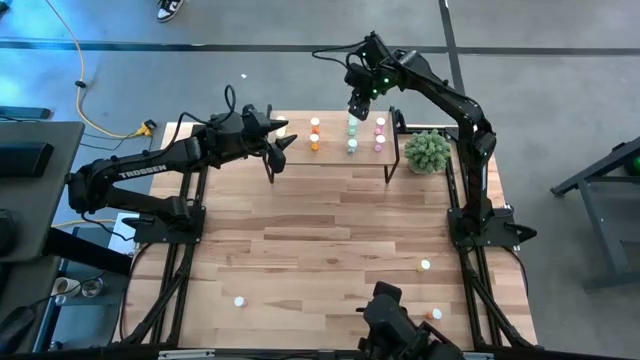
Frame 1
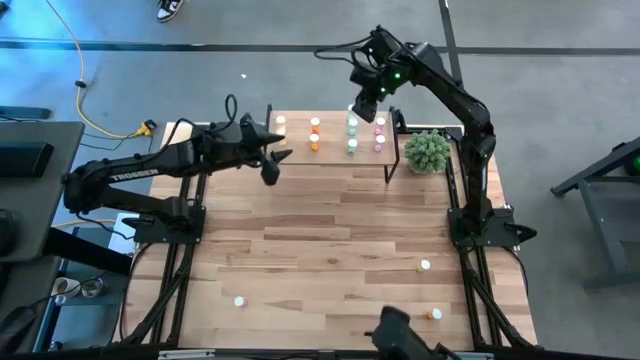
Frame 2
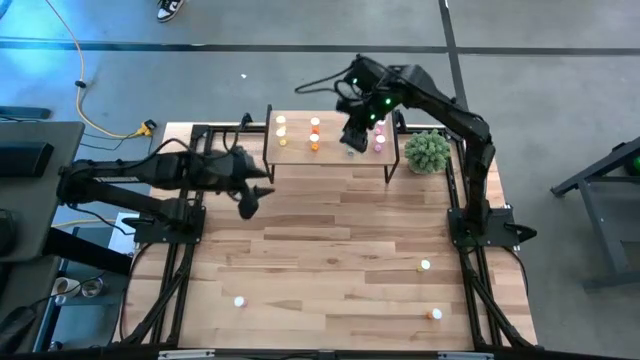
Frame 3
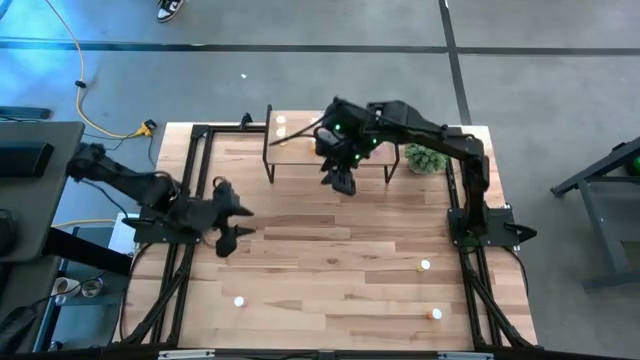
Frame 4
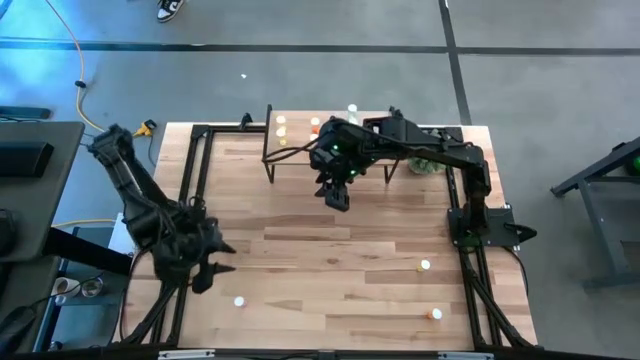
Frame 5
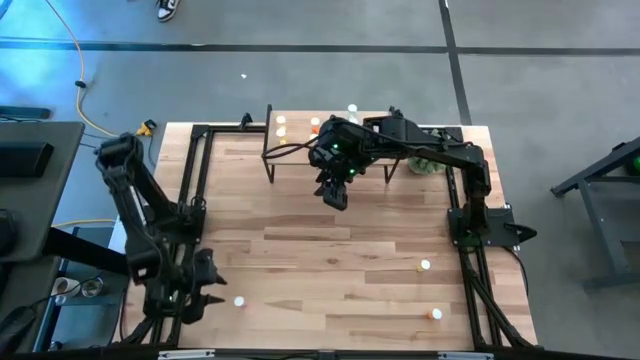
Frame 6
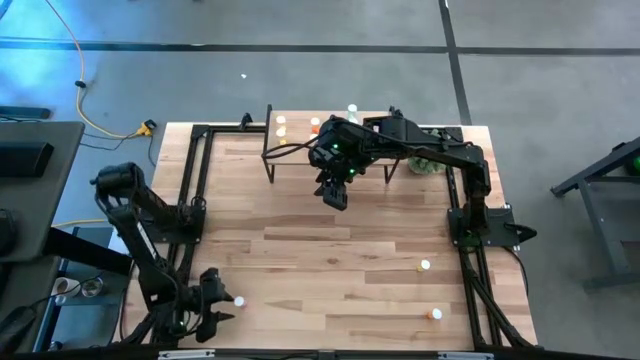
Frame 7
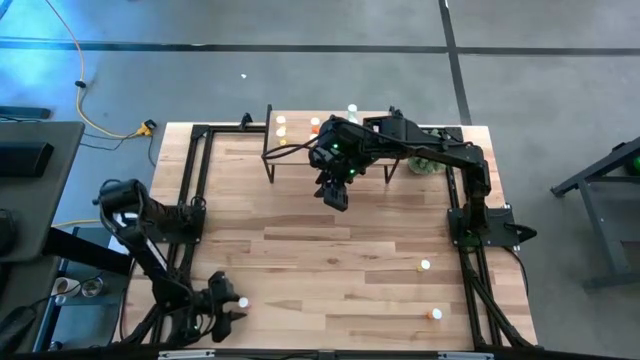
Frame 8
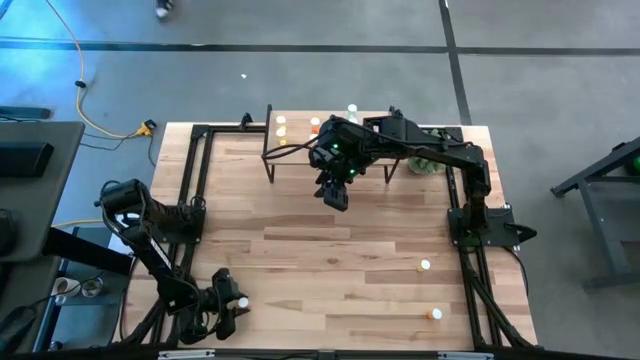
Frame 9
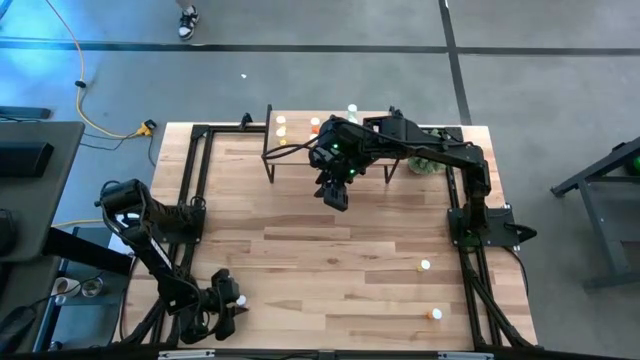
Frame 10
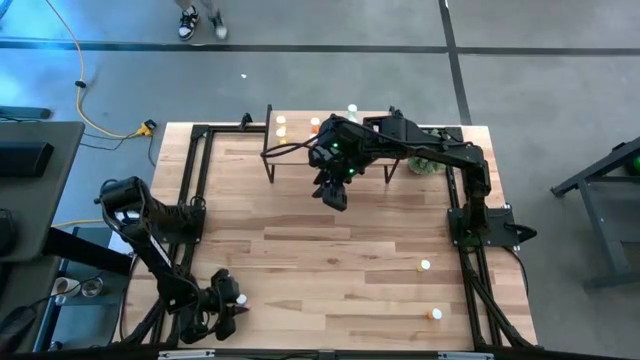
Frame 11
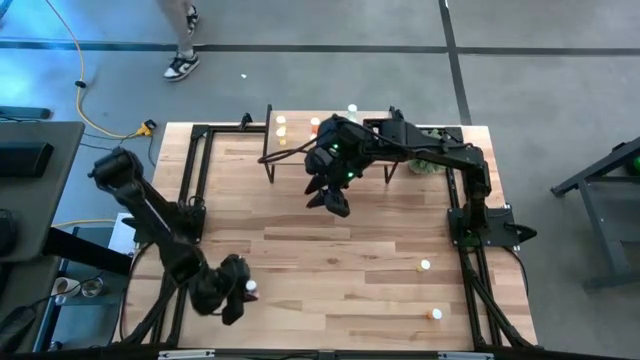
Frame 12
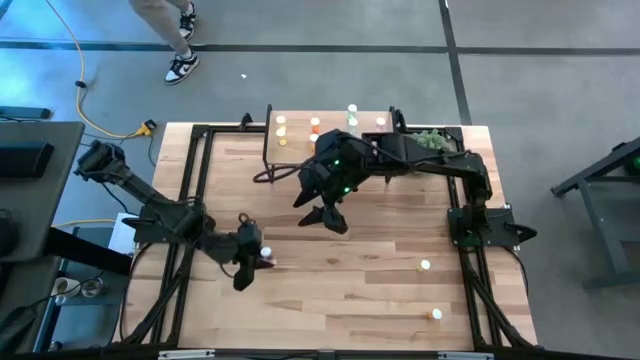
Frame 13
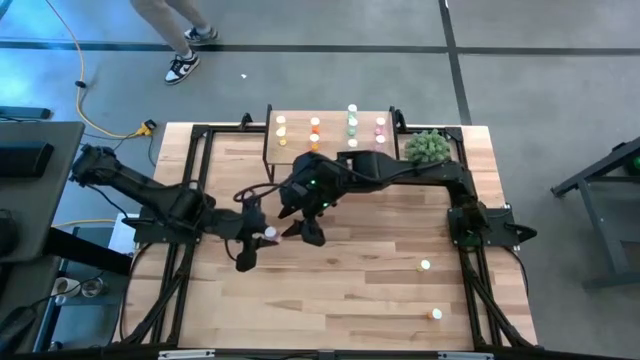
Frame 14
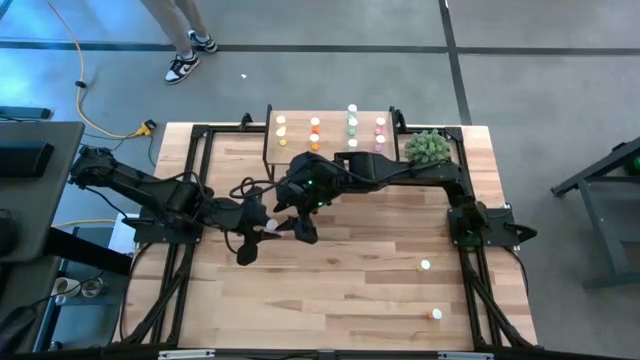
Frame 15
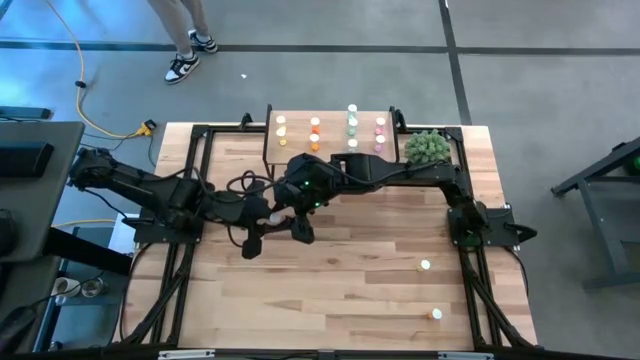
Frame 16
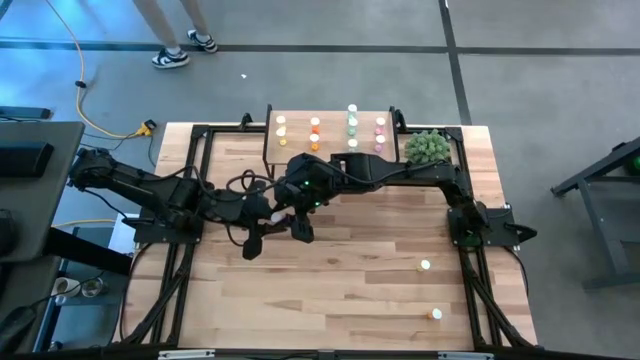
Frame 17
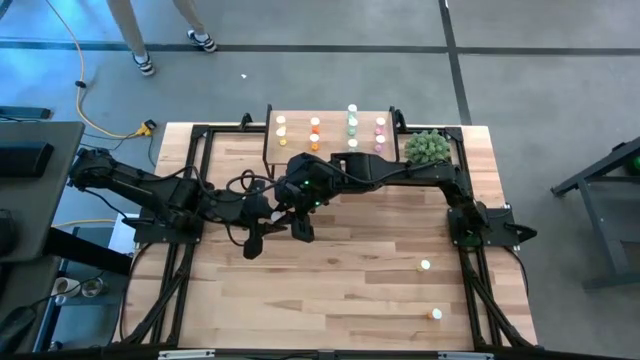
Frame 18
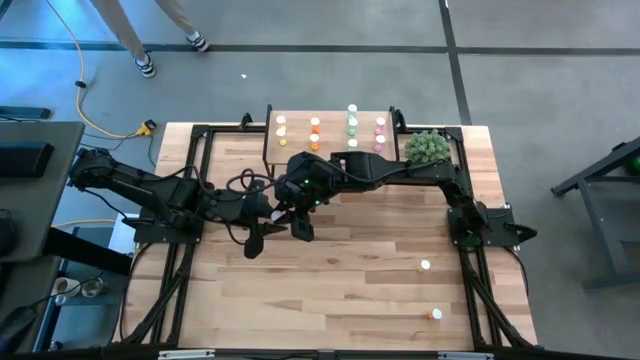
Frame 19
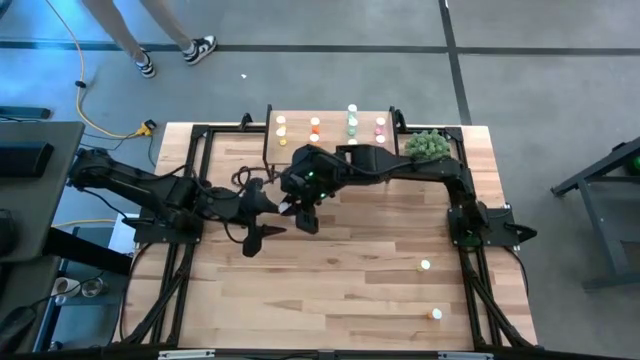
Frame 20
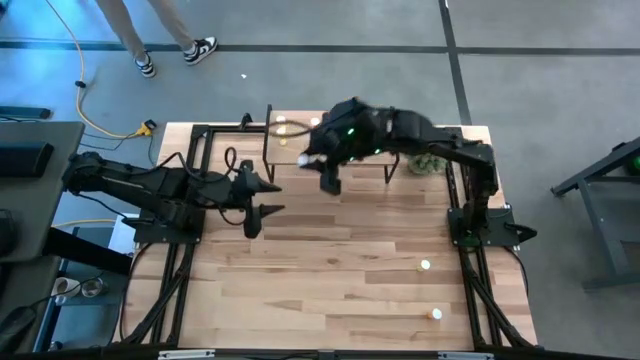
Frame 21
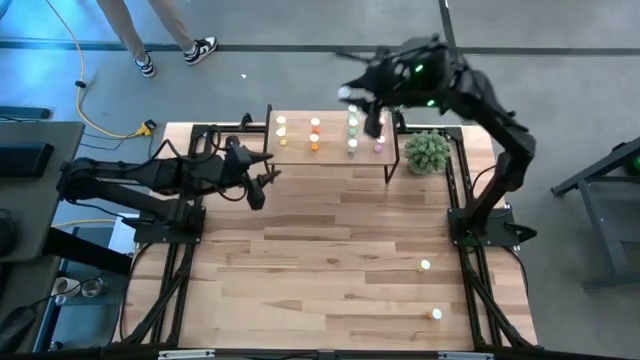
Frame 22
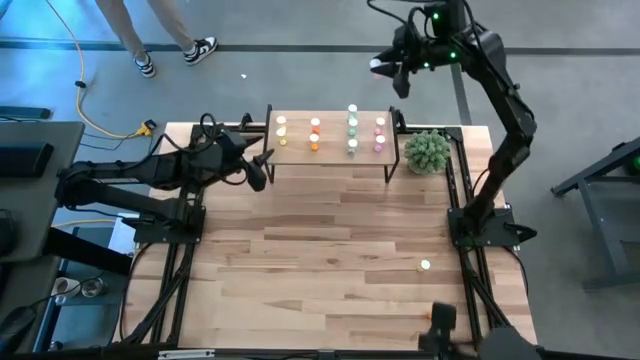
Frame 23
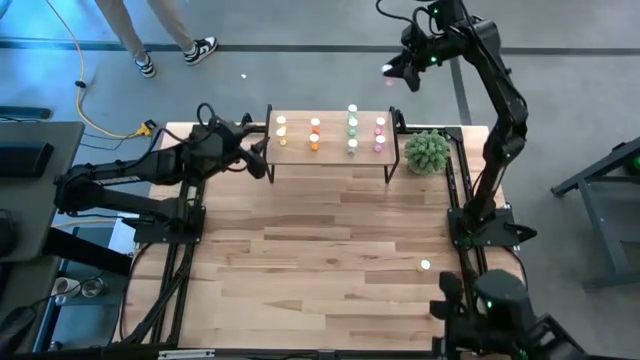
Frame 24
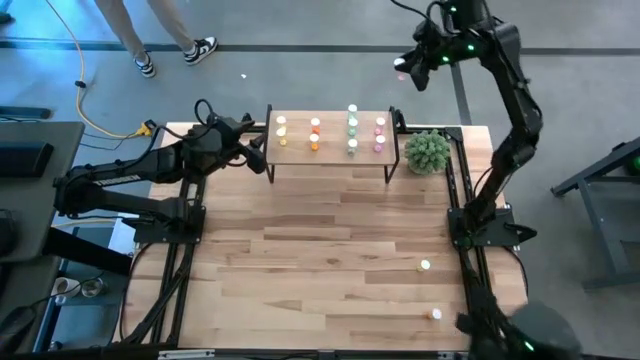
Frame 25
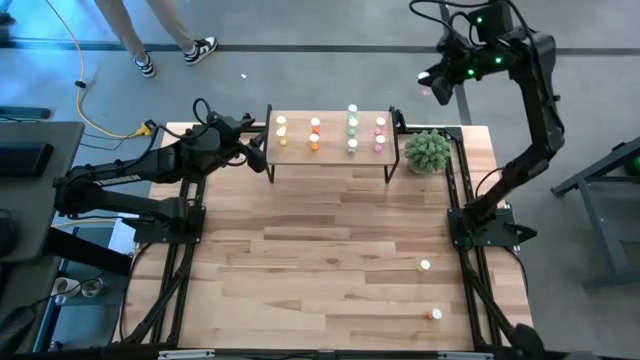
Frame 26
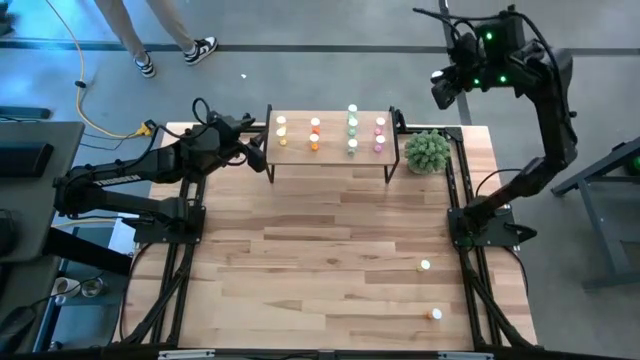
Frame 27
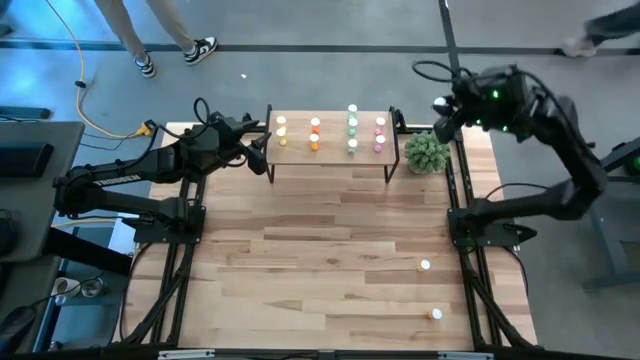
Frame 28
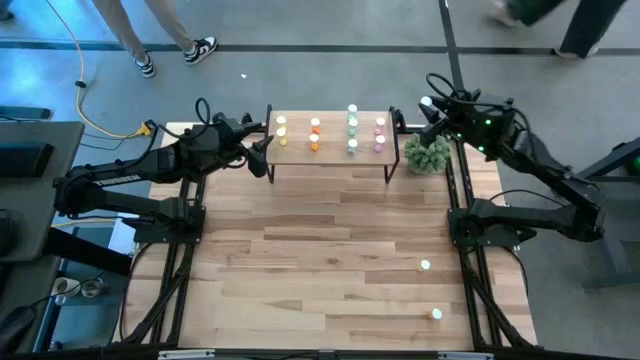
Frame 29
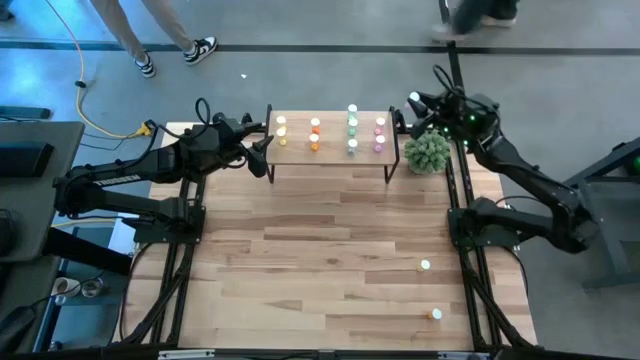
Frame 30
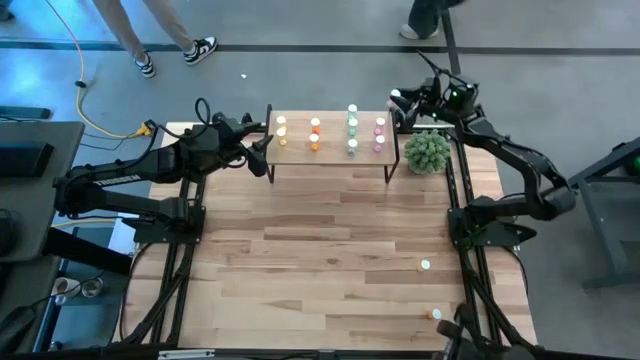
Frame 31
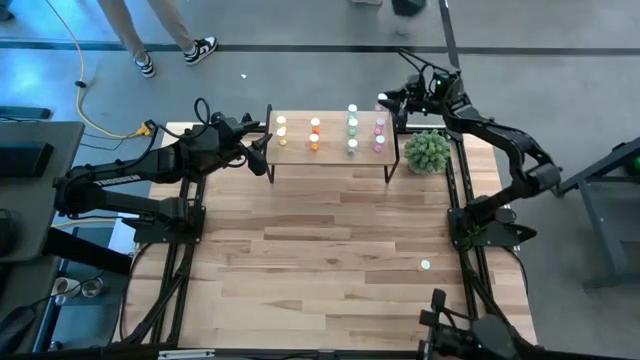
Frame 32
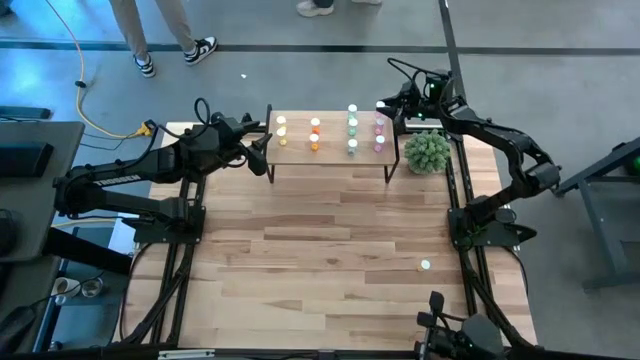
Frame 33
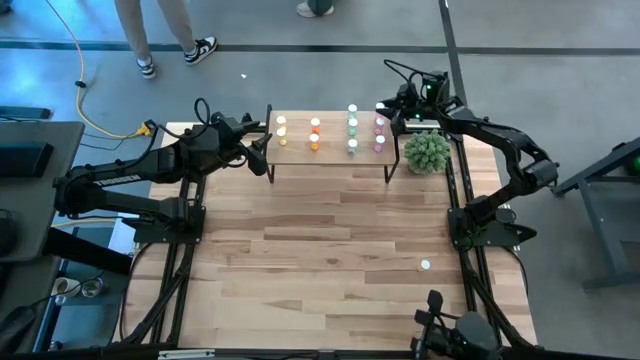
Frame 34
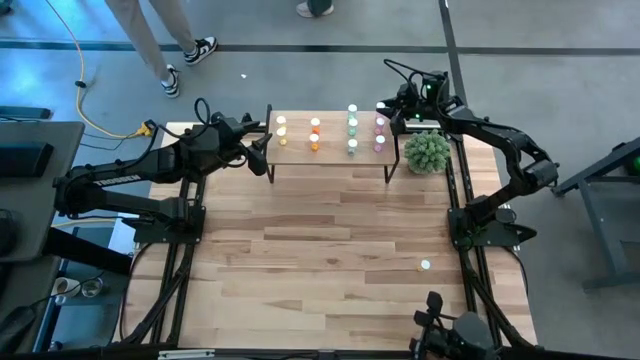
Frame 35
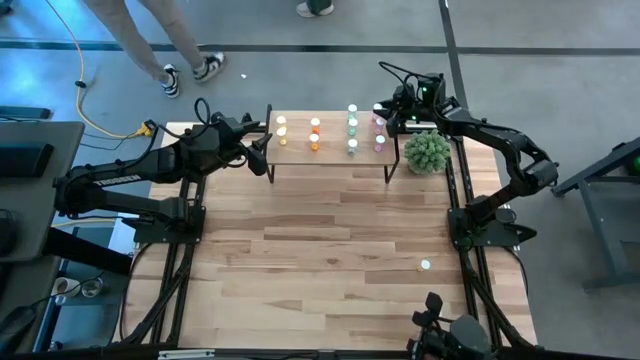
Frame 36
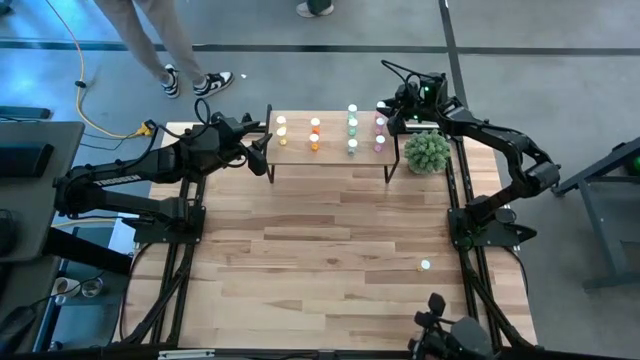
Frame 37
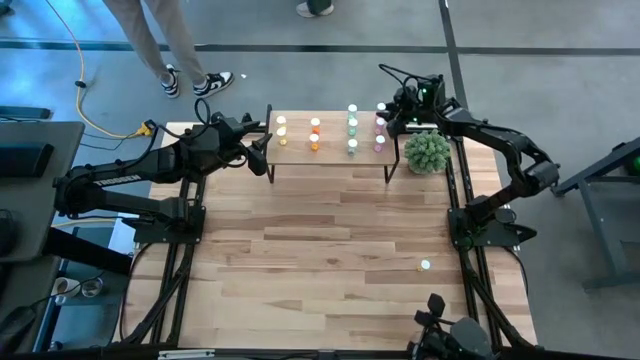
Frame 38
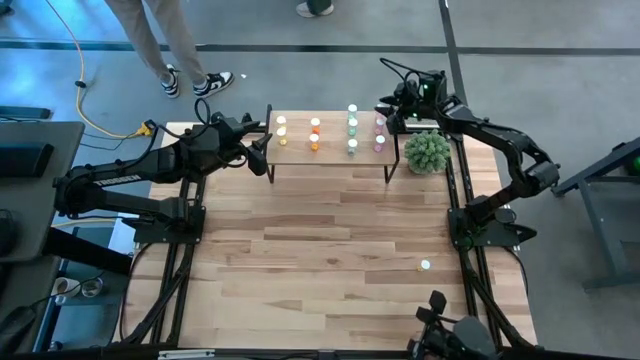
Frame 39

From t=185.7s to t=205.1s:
Task: Pick and place medicine bottles onto shelf by color
Put the pink pill bottle on the shelf aligned with the other pink pill bottles

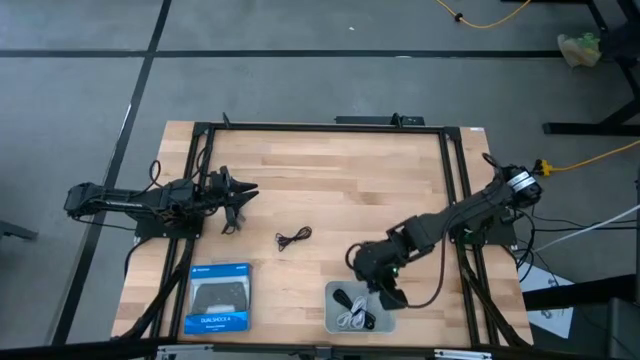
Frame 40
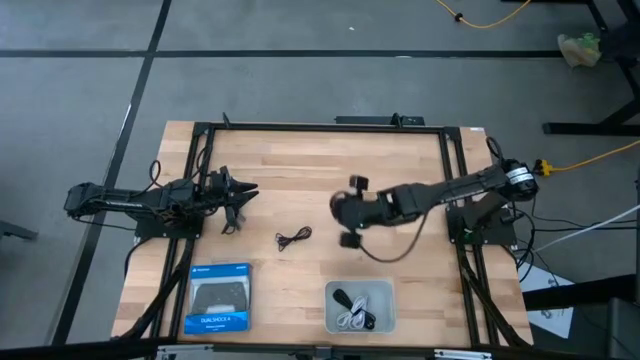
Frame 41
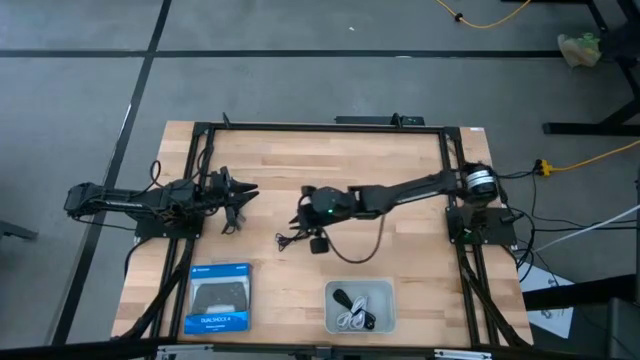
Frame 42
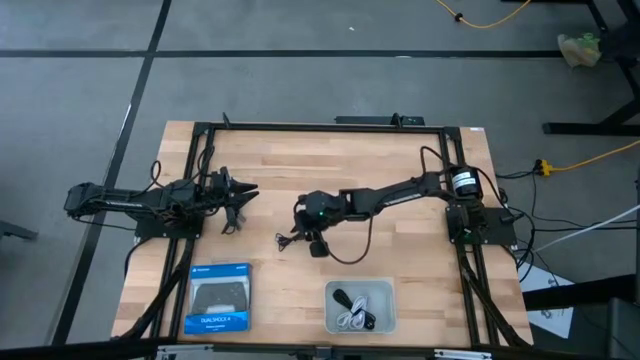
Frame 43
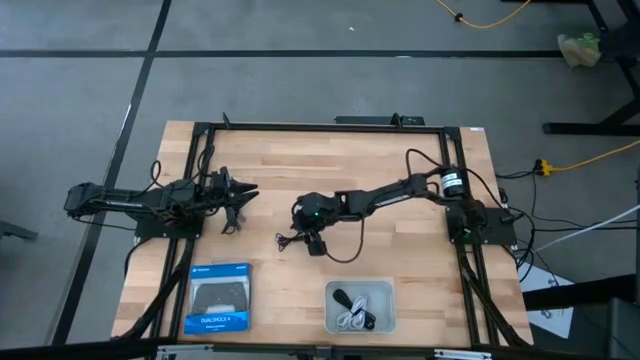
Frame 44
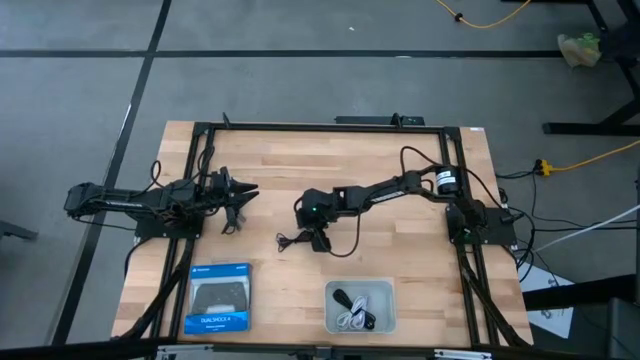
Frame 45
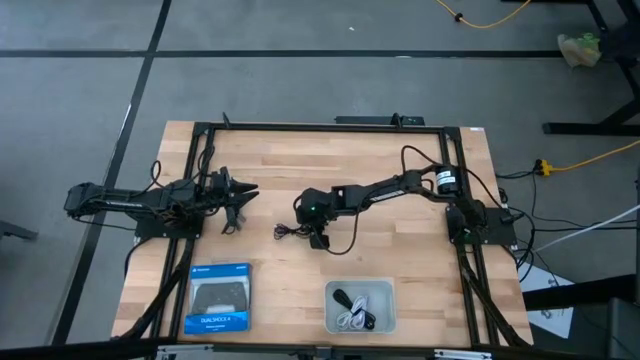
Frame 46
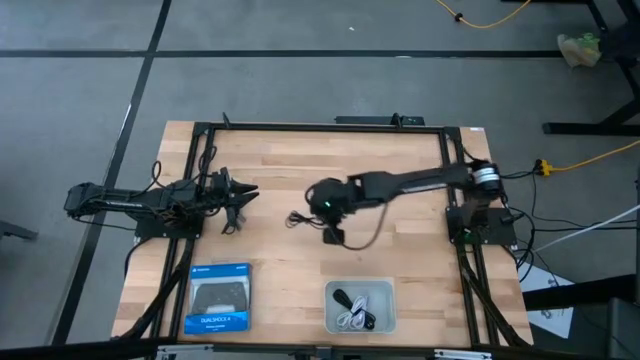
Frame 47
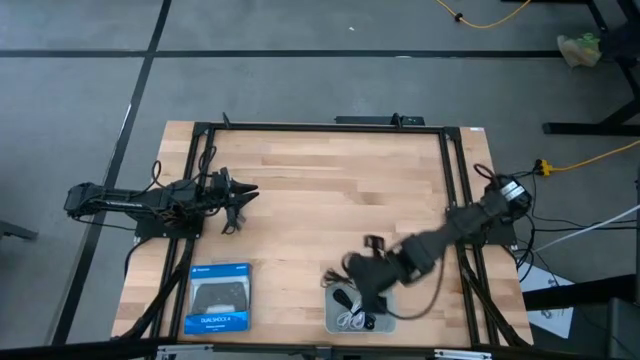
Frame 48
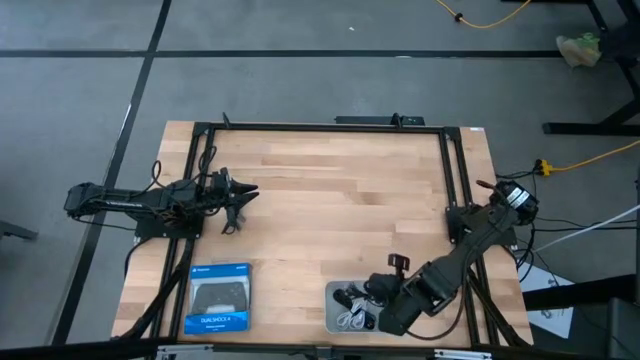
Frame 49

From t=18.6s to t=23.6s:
Task: Pick and place USB-C Cables
Put the bottom black USB cable into the white bin
